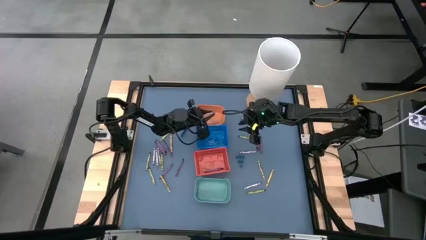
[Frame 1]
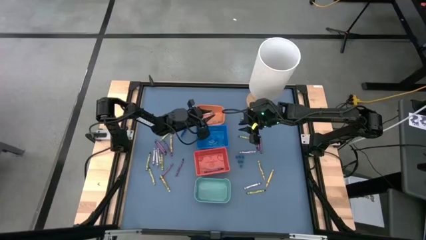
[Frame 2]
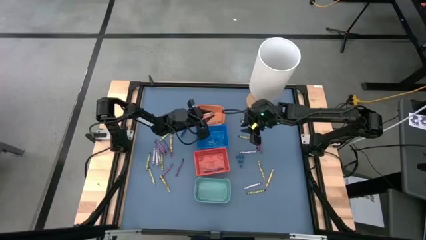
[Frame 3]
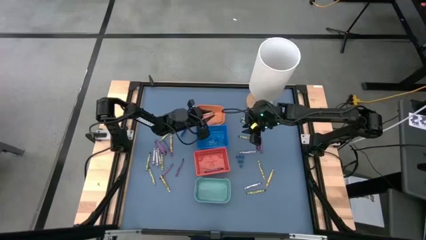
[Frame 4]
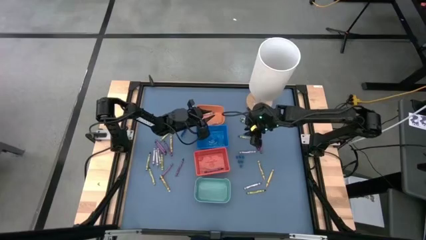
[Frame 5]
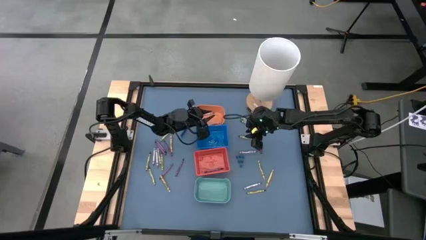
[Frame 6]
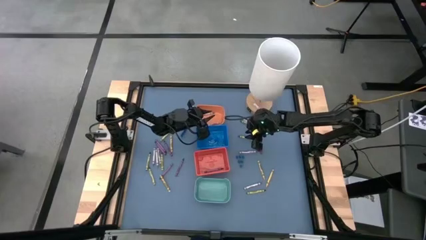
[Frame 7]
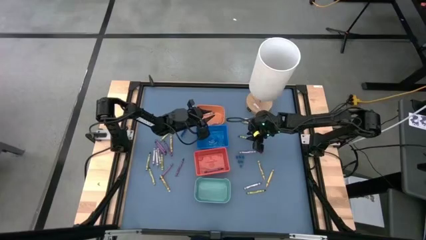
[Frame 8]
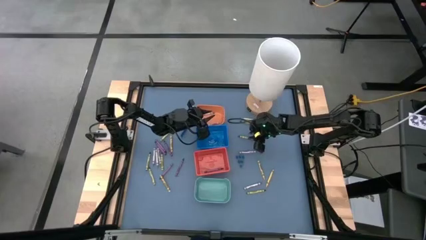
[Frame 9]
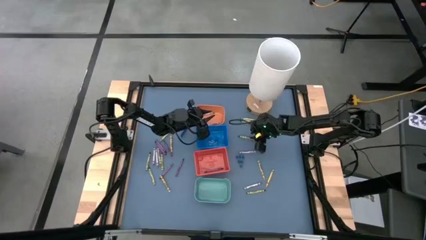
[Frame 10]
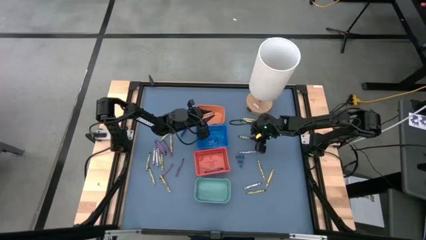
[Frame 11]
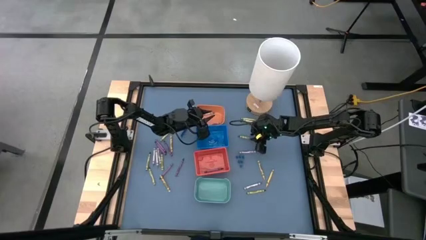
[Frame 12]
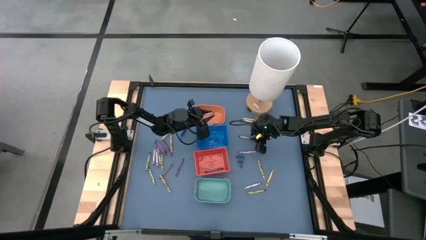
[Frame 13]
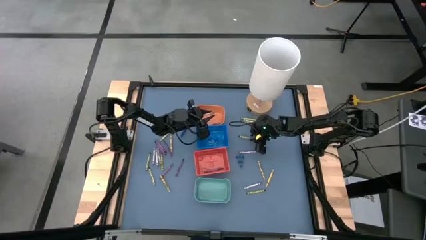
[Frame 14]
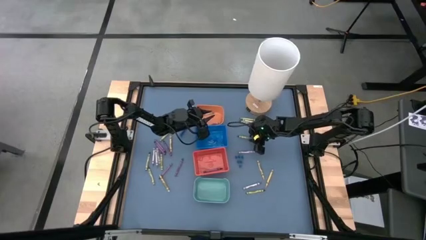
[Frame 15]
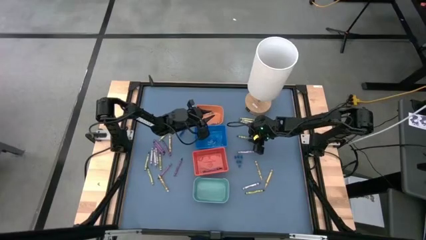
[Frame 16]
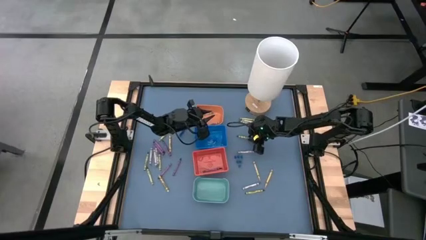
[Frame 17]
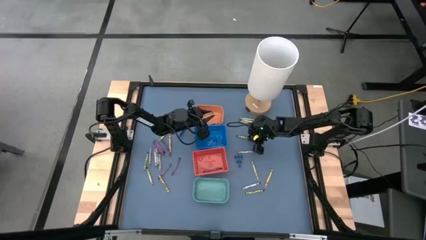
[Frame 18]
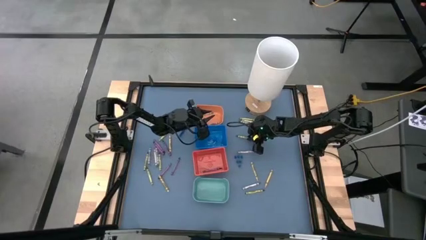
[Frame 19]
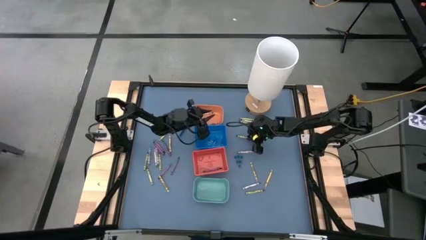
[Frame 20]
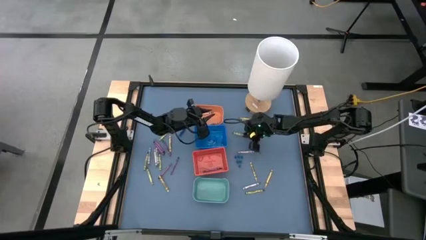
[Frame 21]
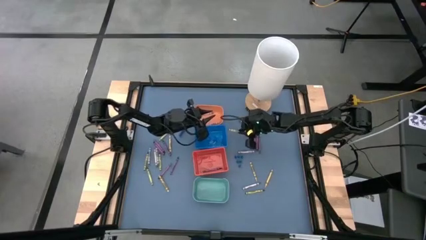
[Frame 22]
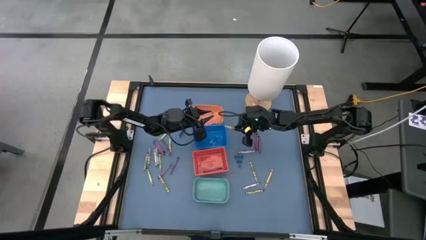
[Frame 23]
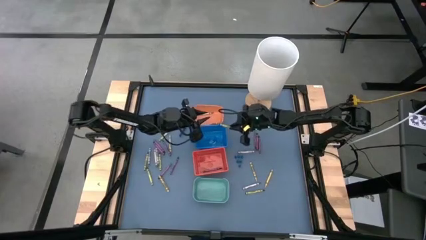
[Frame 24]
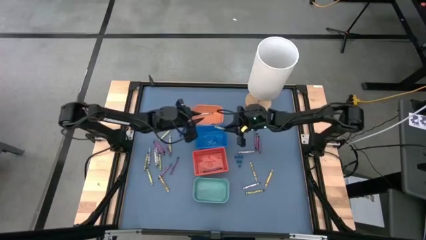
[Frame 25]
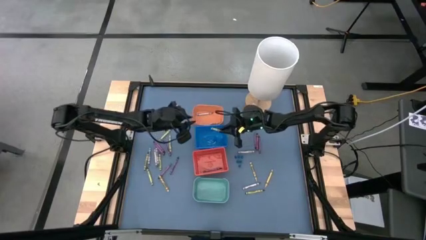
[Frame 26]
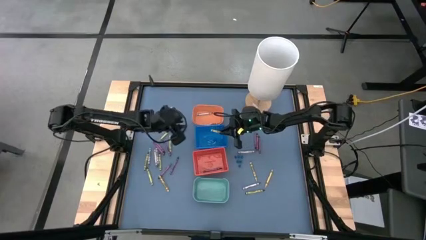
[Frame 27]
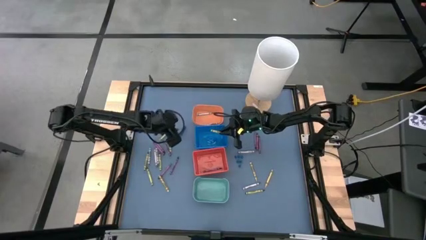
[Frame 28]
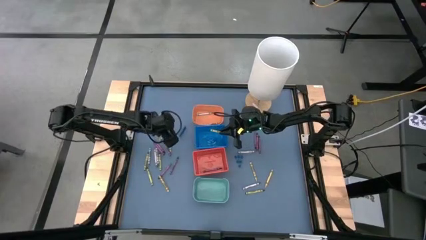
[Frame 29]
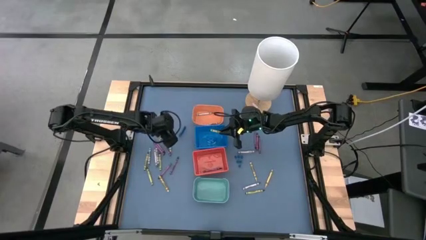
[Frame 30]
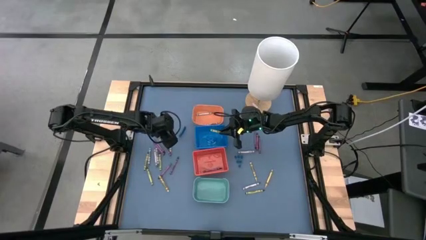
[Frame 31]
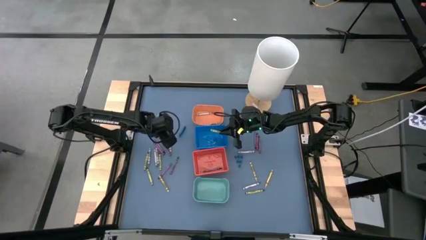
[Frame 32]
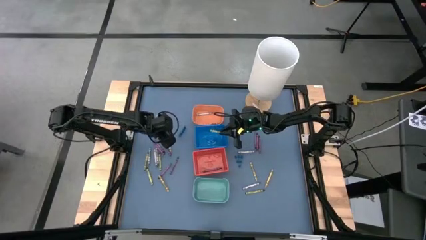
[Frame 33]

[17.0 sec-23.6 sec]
Task: Sort crayons
Put the green crayon into the blue bin

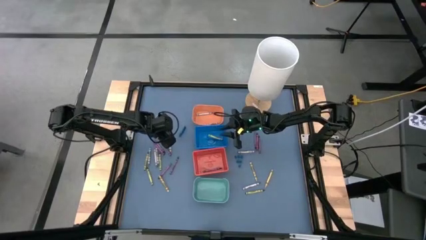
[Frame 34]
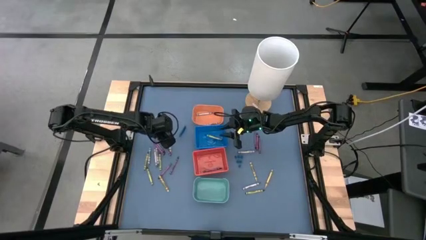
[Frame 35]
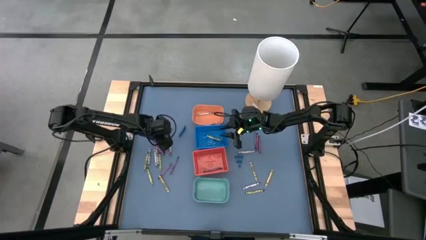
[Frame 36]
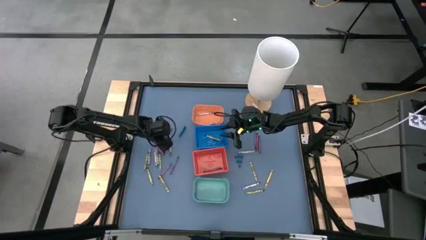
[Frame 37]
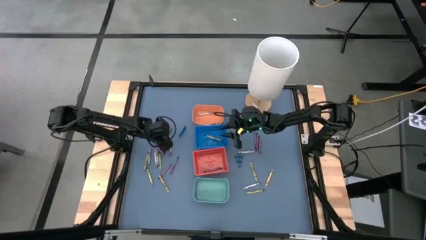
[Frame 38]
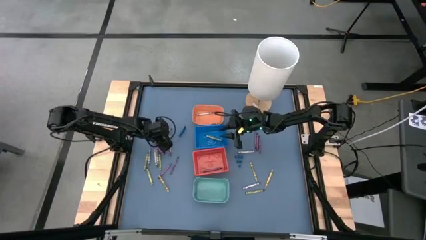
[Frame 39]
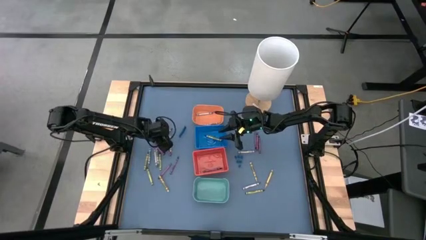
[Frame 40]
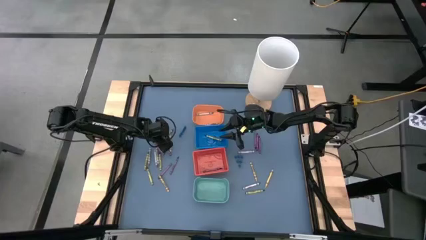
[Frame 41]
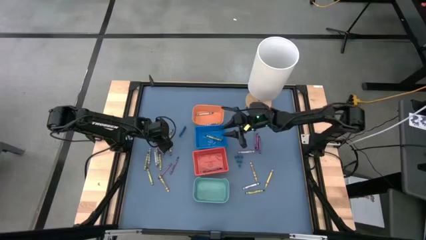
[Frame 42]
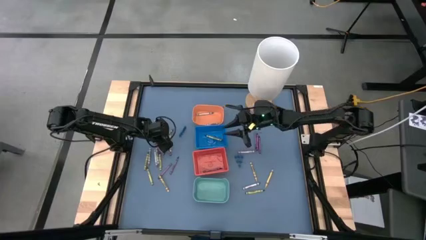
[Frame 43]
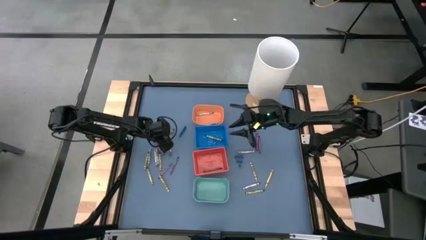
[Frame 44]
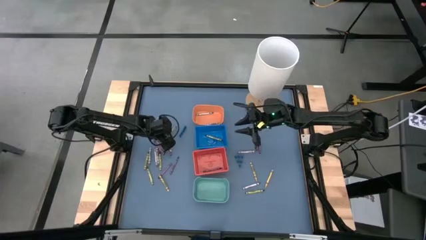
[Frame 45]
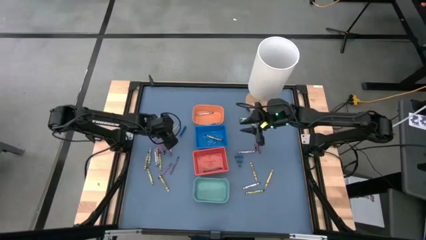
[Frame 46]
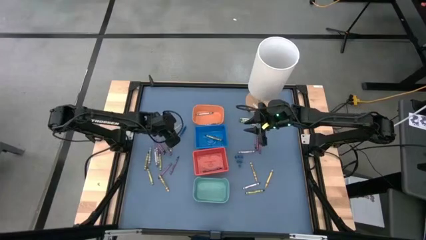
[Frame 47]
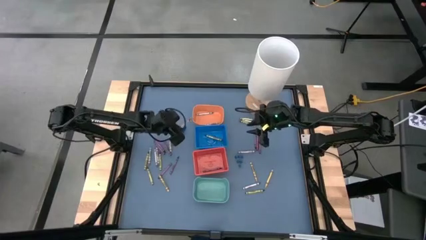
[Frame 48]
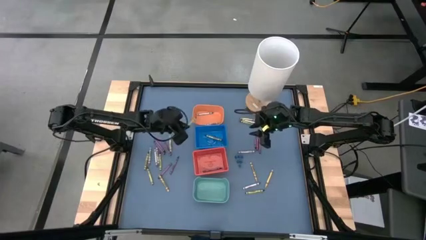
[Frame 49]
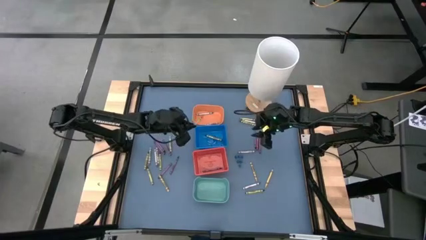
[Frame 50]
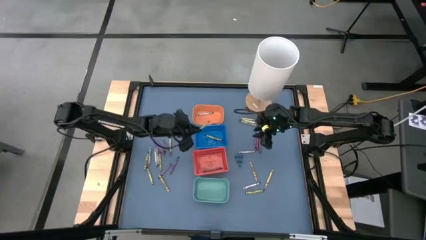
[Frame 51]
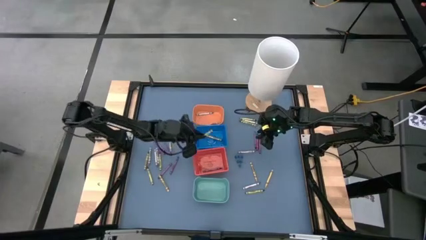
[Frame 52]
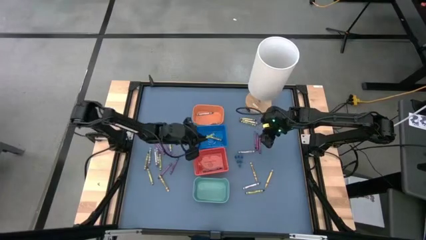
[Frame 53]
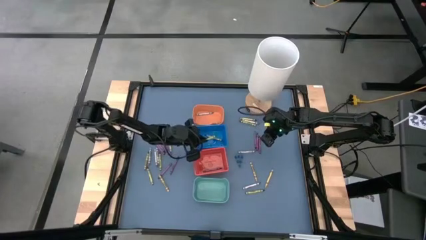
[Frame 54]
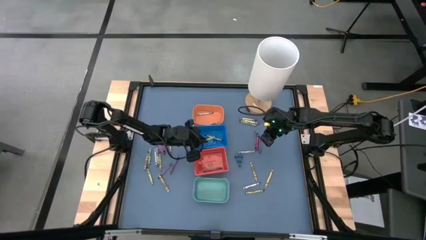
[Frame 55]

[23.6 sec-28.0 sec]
Put the green crayon into the blue bin

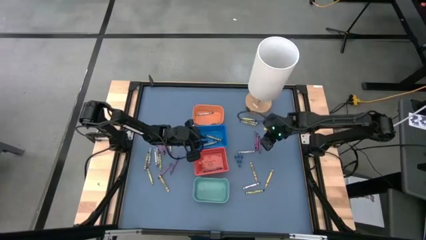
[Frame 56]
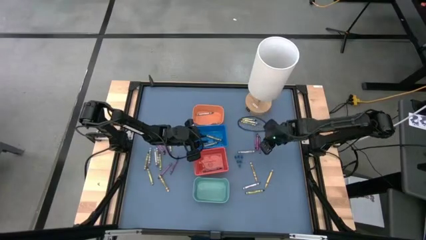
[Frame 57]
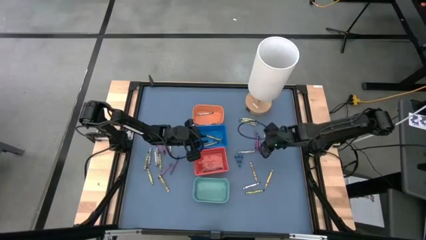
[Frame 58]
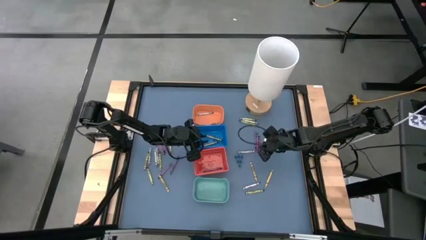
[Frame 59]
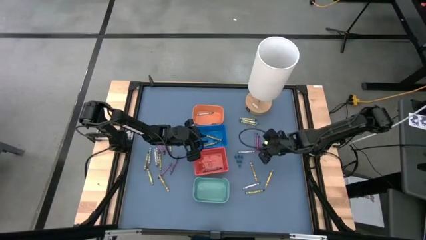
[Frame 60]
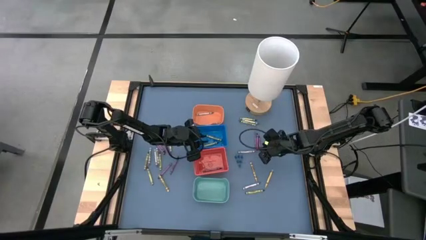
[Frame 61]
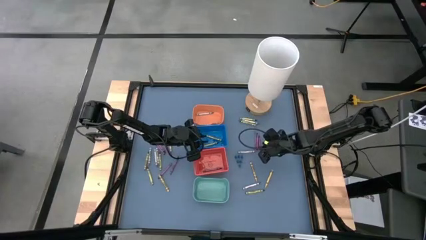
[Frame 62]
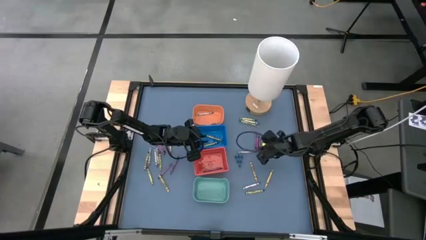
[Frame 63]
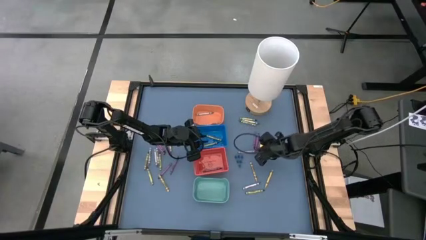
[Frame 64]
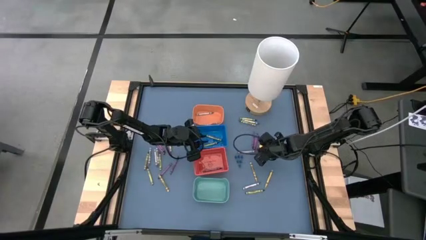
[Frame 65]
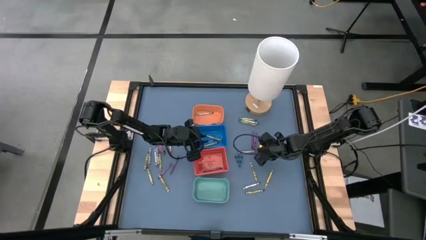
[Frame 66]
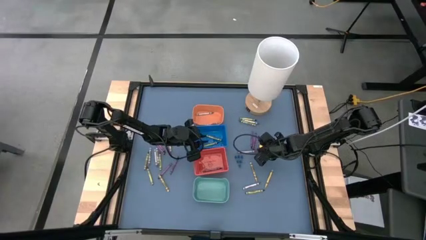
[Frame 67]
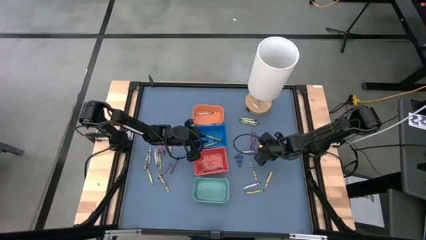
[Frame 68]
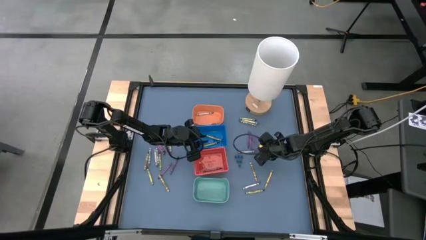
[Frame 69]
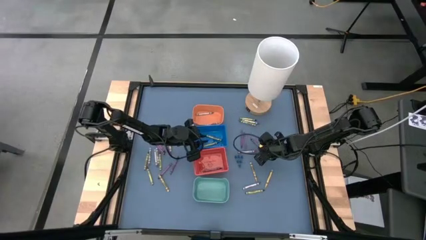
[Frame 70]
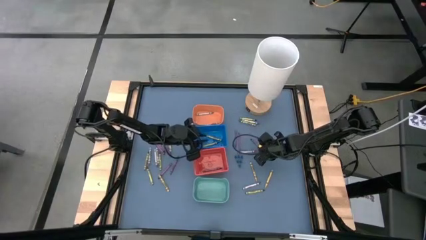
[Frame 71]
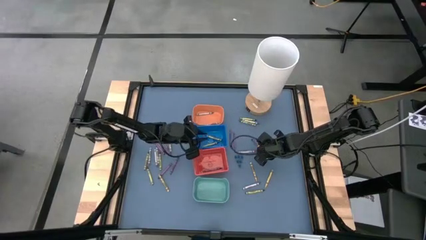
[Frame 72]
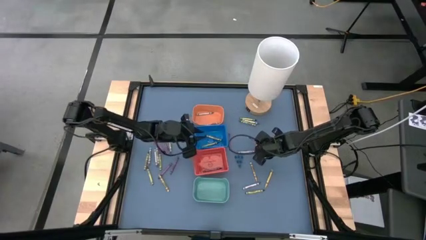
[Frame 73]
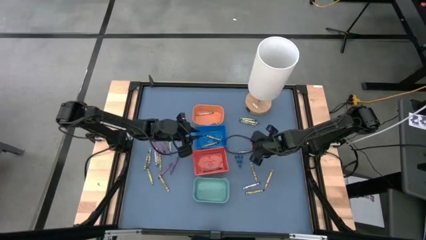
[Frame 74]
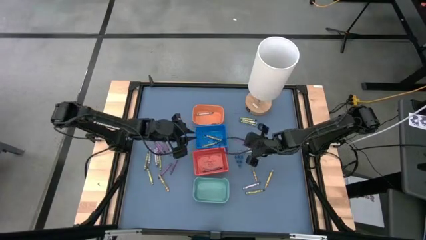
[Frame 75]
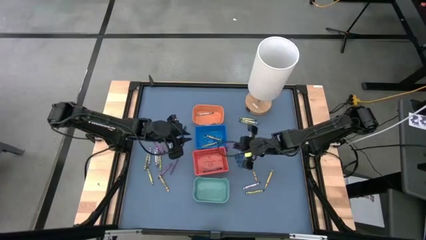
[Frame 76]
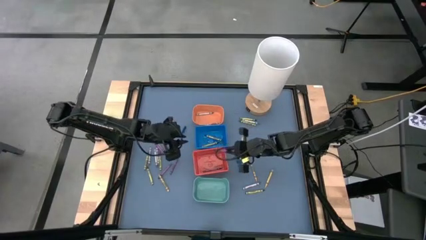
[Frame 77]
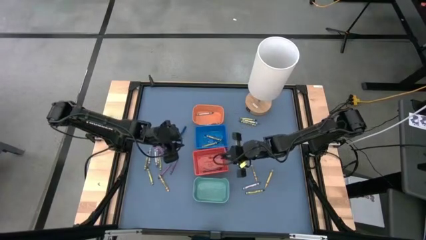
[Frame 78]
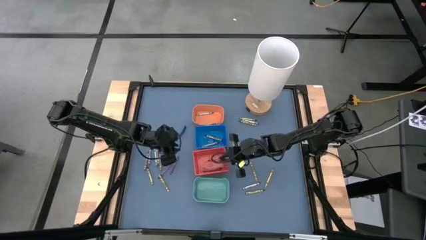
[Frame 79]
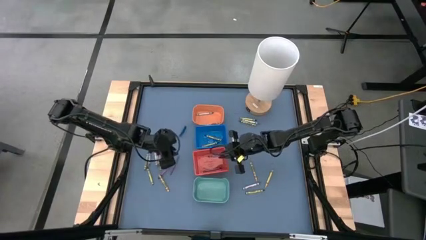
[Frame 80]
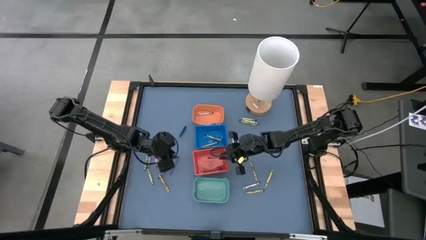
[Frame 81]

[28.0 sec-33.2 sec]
Put the purple crayon into the red bin
